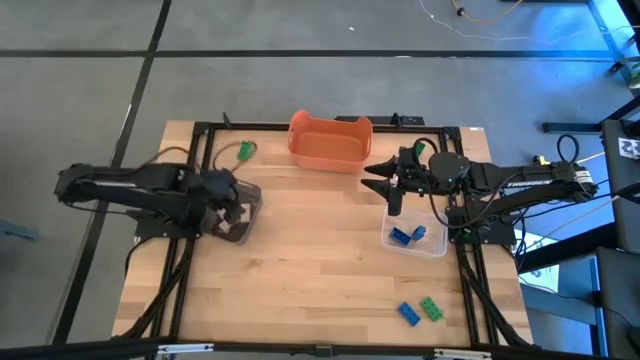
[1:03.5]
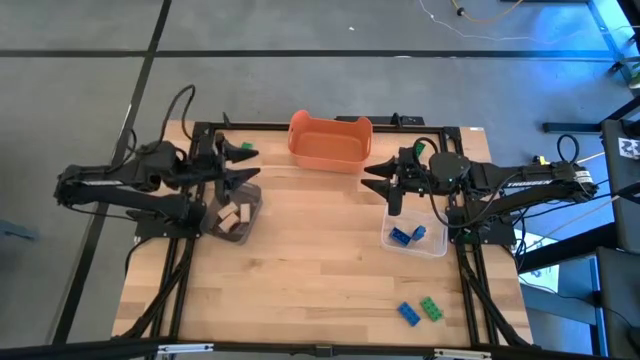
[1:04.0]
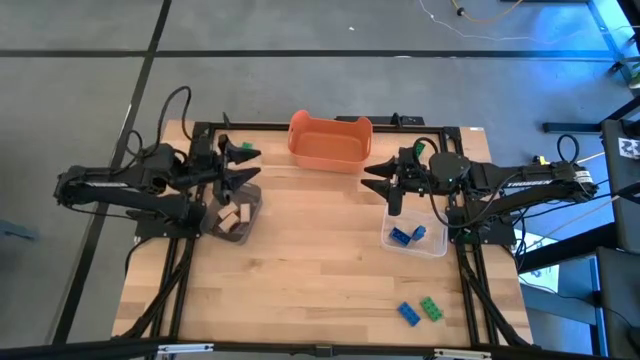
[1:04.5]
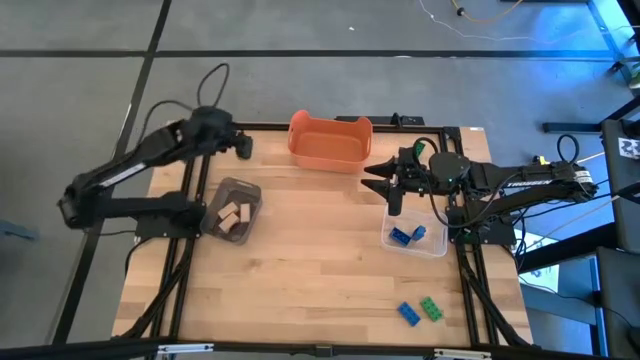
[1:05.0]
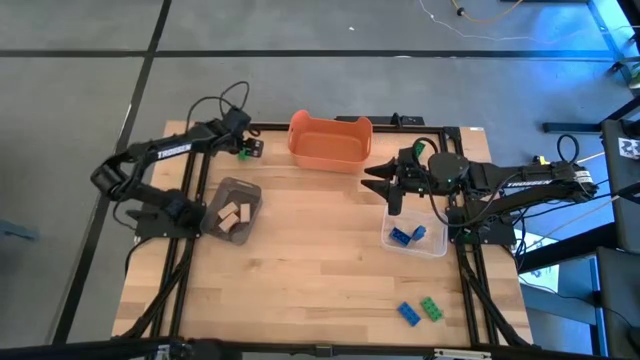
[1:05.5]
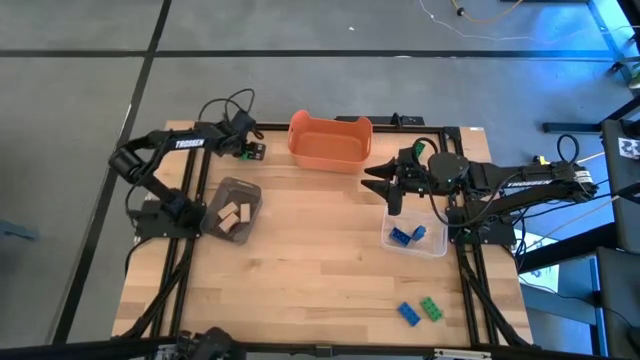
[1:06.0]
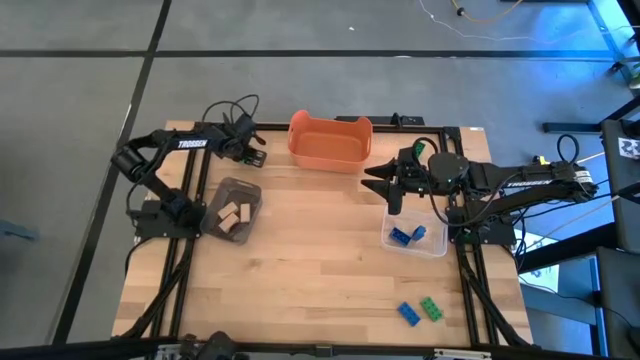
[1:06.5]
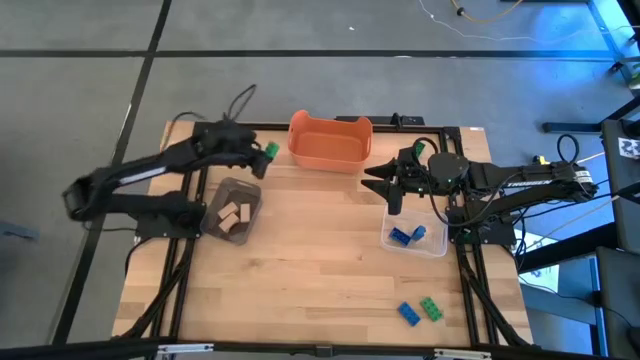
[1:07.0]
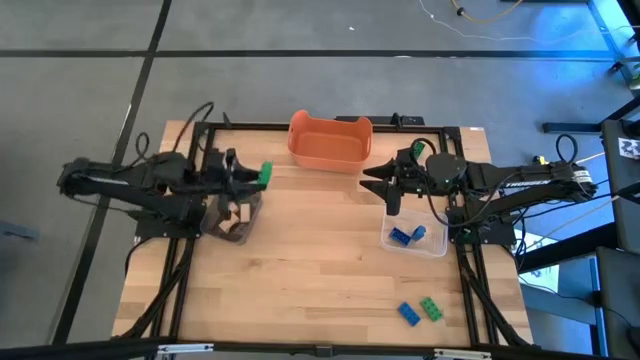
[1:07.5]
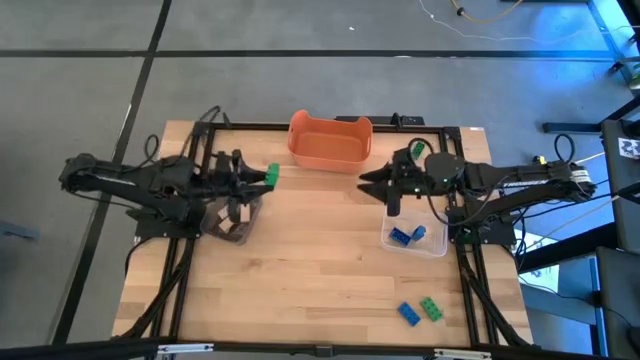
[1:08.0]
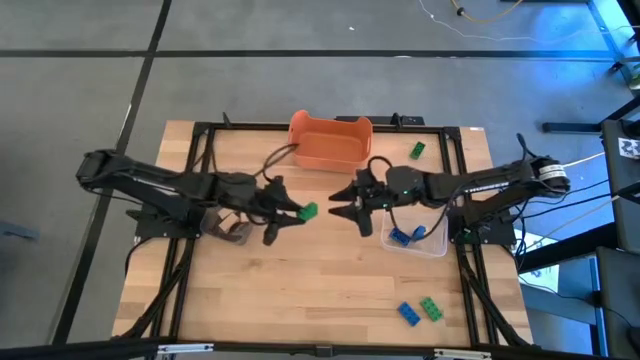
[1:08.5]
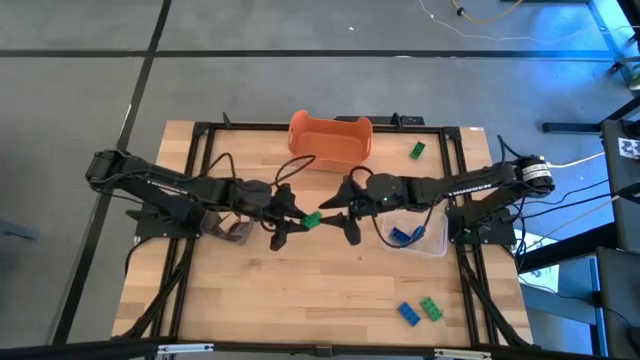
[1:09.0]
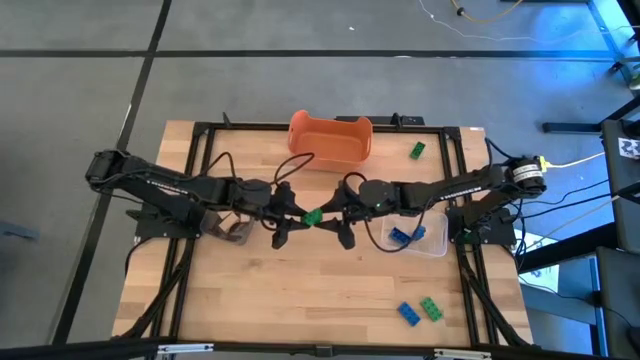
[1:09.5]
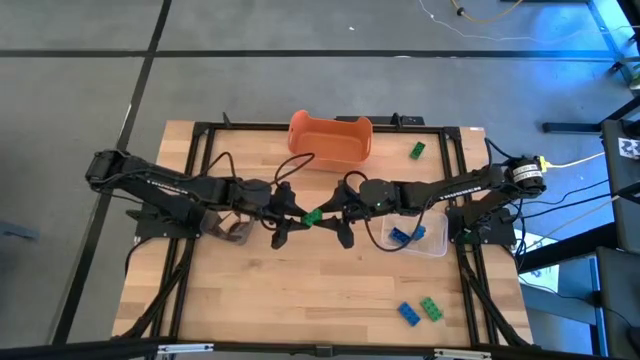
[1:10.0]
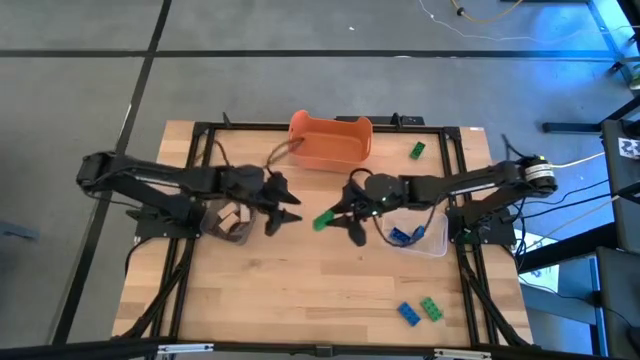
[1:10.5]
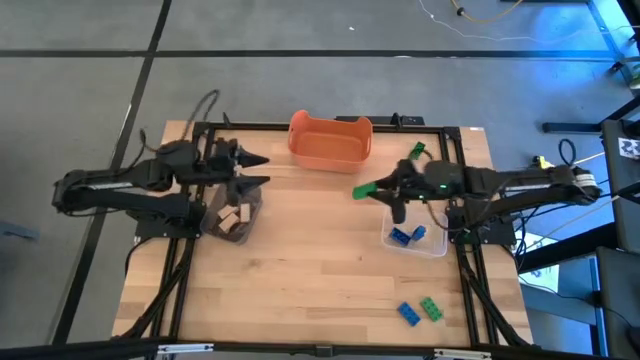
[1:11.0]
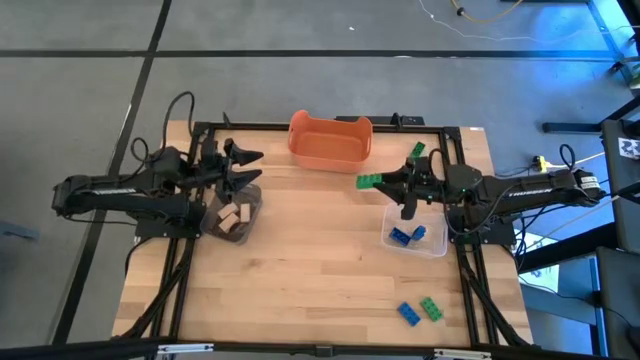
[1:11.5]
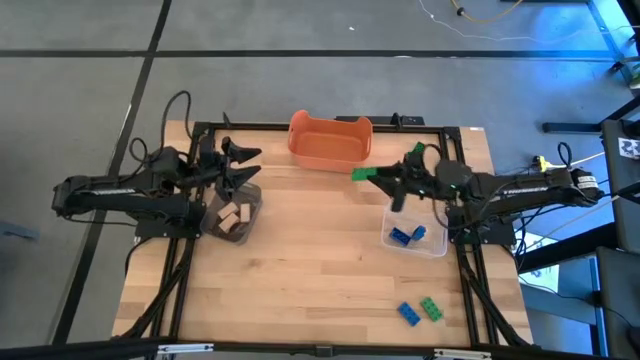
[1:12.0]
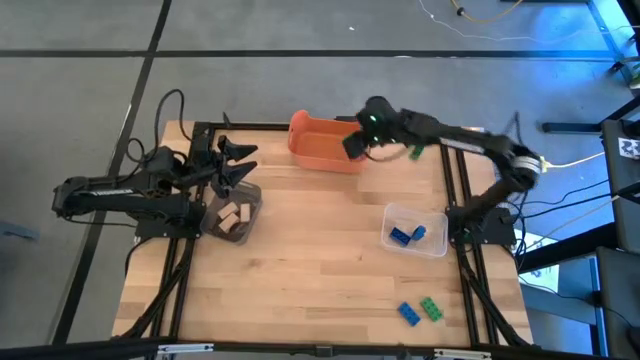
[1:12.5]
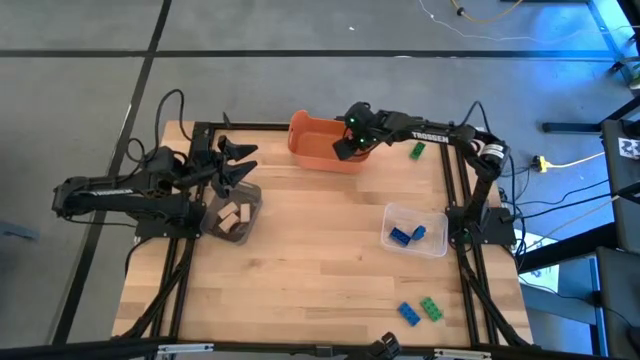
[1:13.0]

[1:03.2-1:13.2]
Task: Sort & place blocks by color
Put the top left green game piece into the orange bin

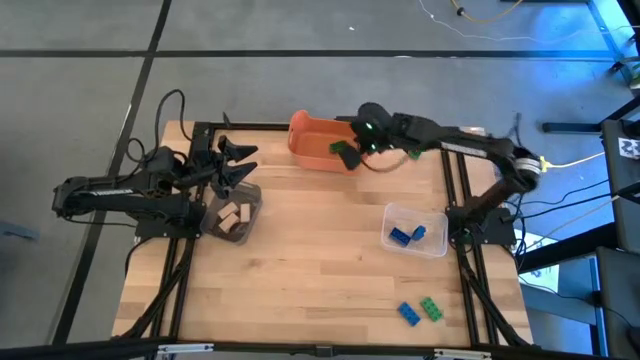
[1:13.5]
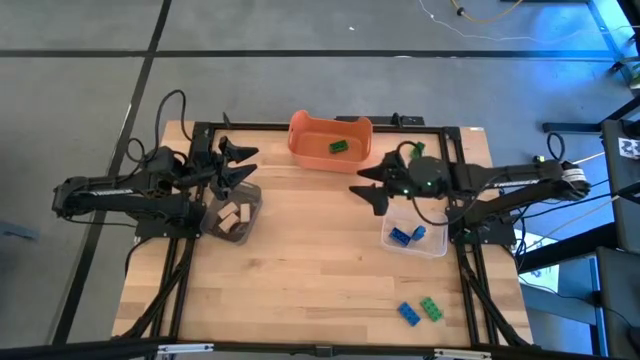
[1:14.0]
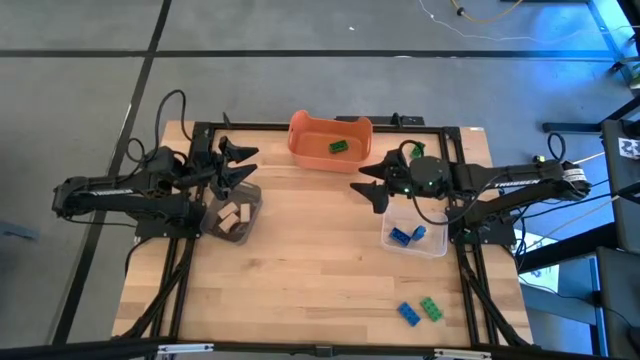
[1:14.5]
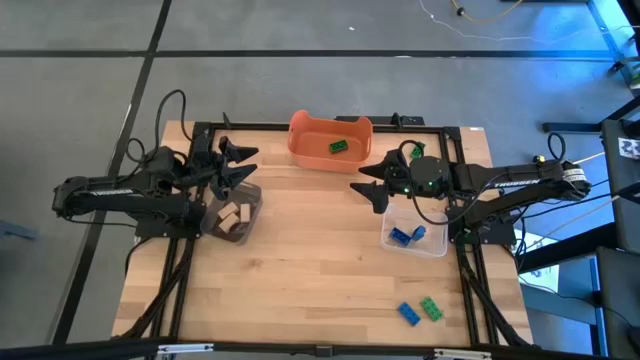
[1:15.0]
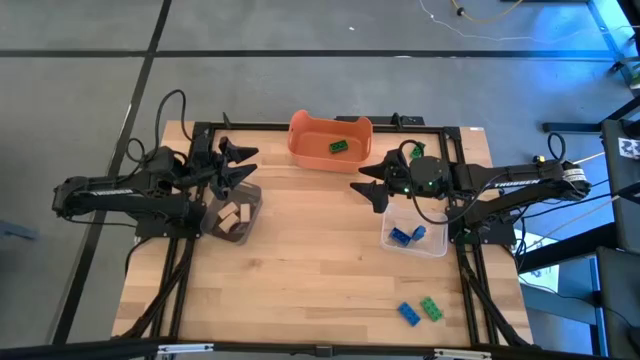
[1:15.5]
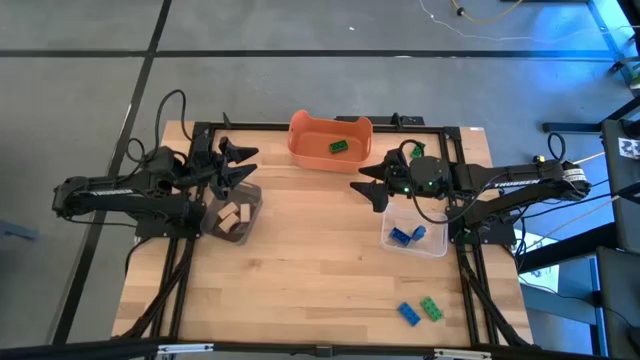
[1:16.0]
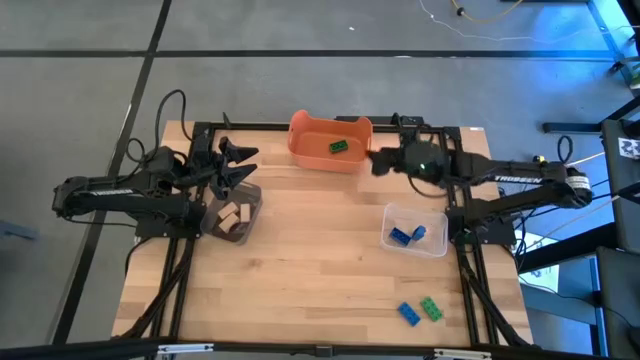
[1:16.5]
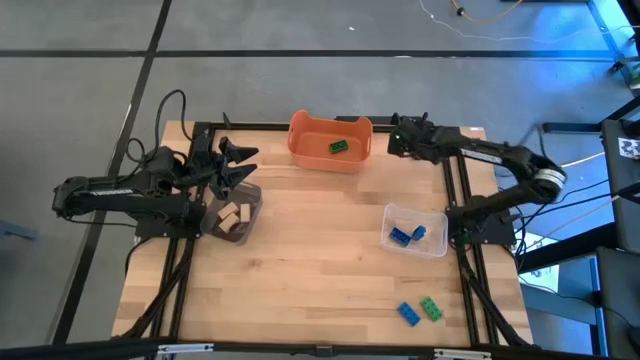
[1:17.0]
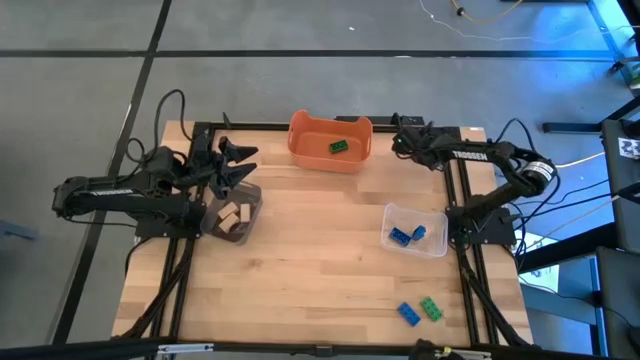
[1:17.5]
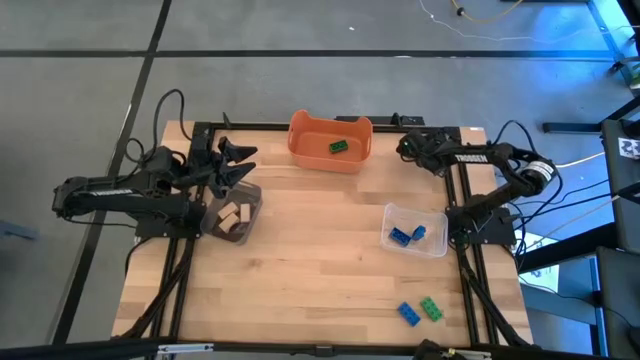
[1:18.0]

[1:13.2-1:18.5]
Put the top green game piece into the orange bin

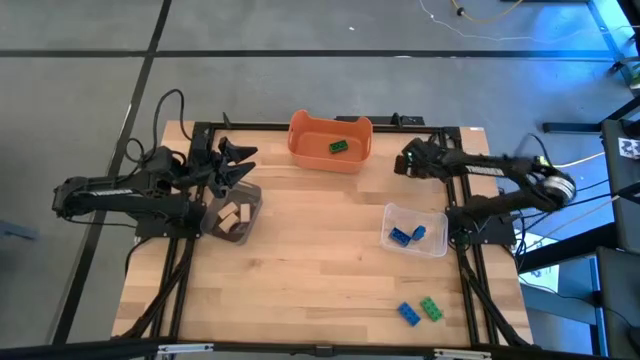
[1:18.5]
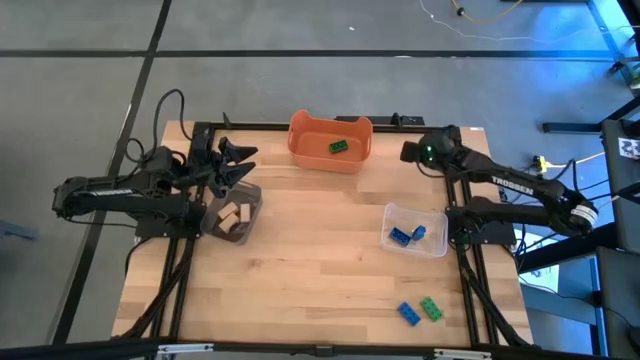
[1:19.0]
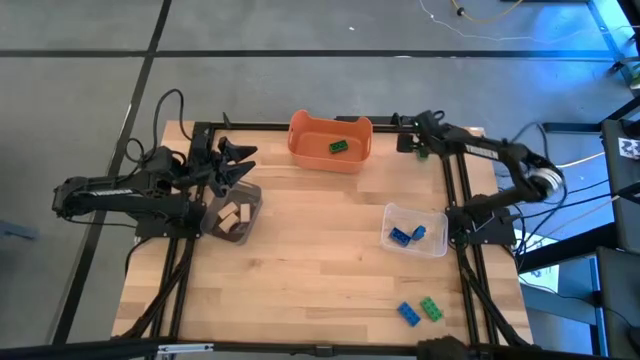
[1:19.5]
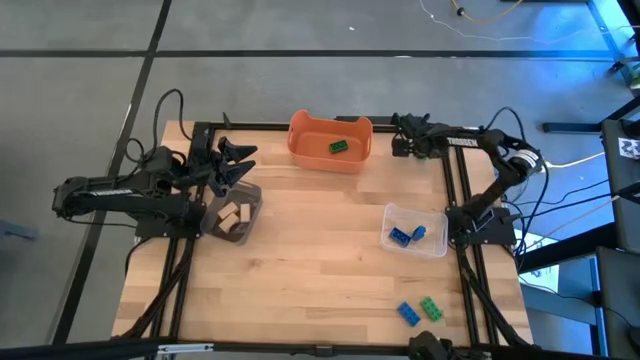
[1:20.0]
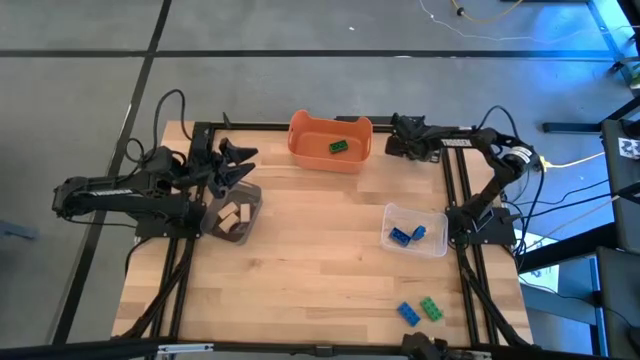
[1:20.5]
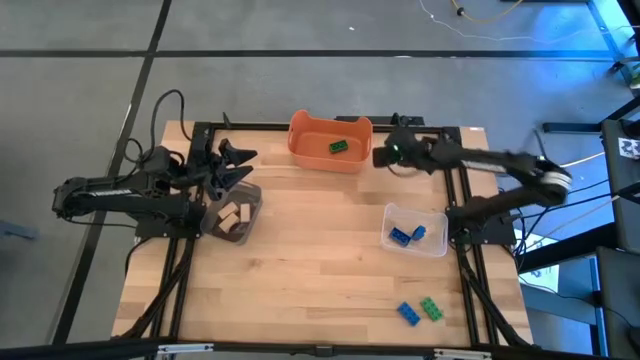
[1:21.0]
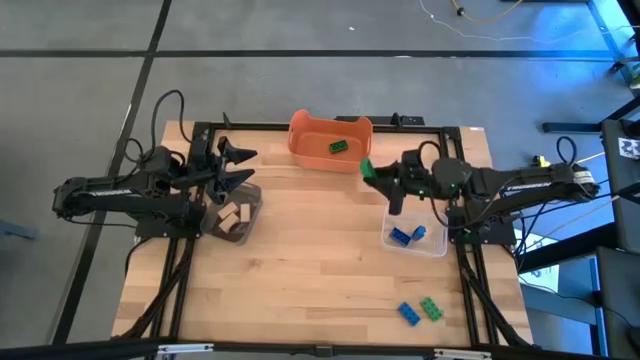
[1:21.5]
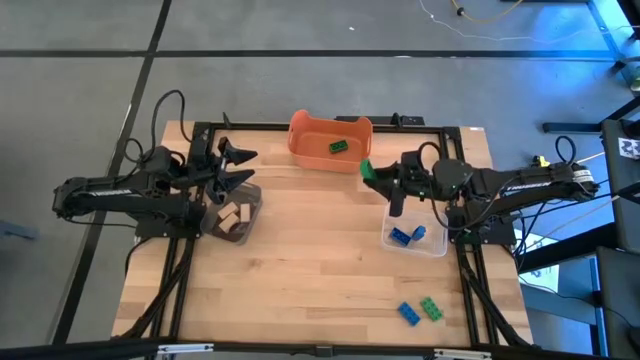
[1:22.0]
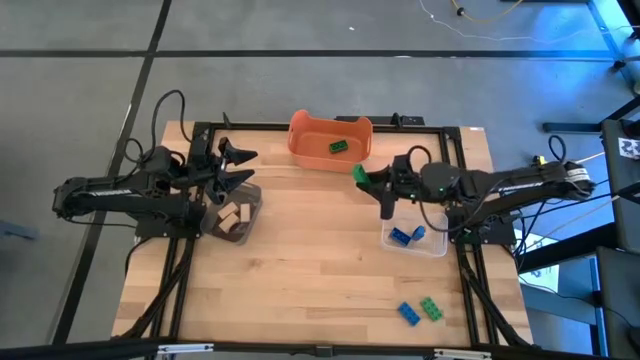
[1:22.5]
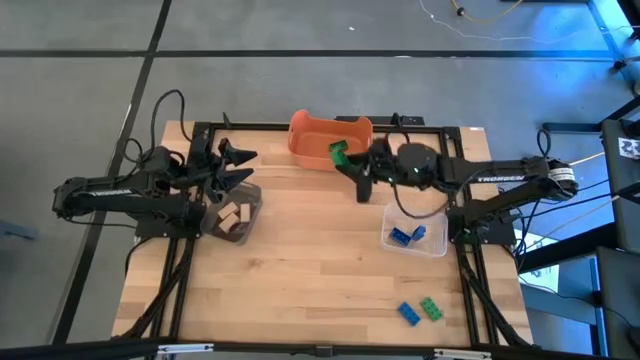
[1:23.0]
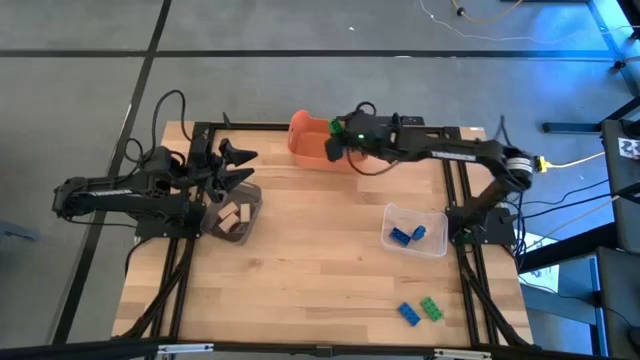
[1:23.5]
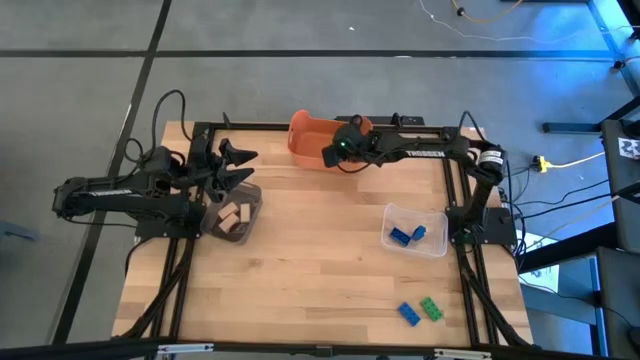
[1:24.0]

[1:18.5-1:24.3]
Put the top green game piece into the orange bin
